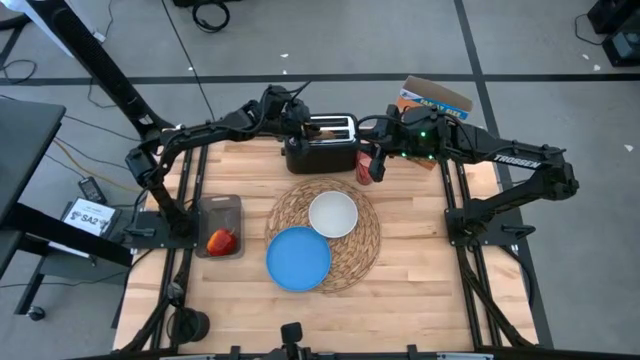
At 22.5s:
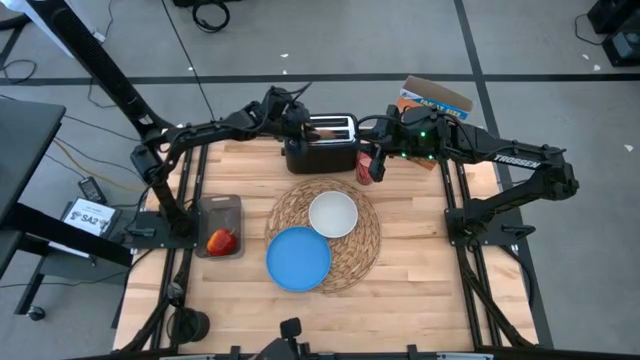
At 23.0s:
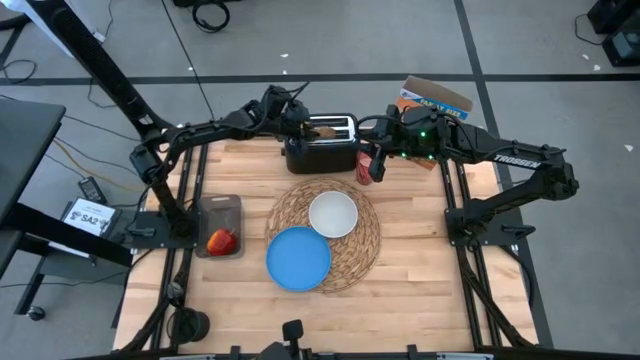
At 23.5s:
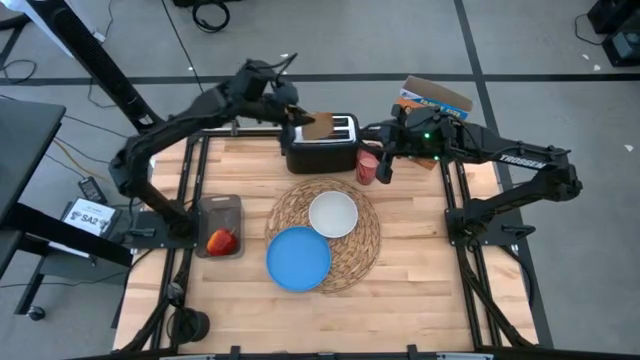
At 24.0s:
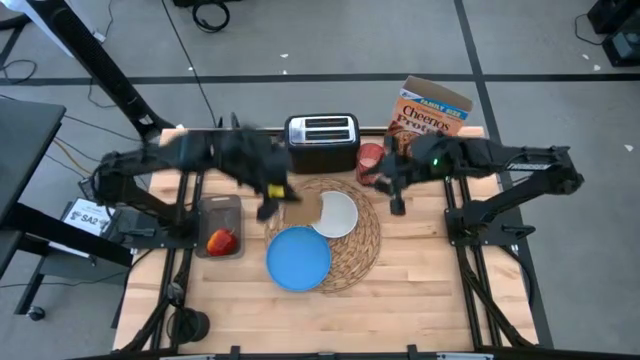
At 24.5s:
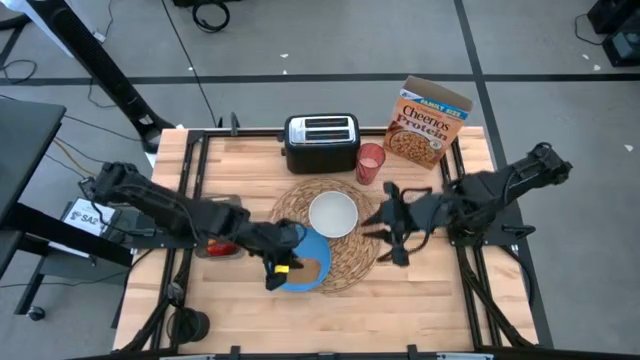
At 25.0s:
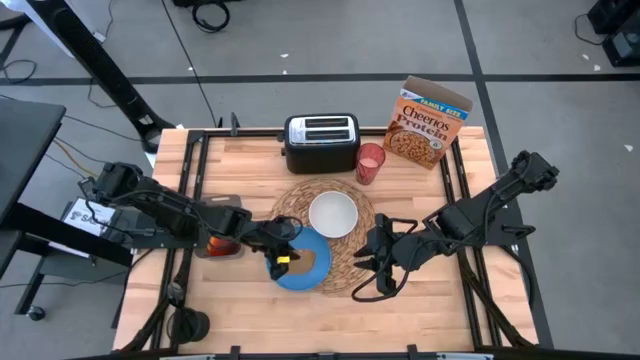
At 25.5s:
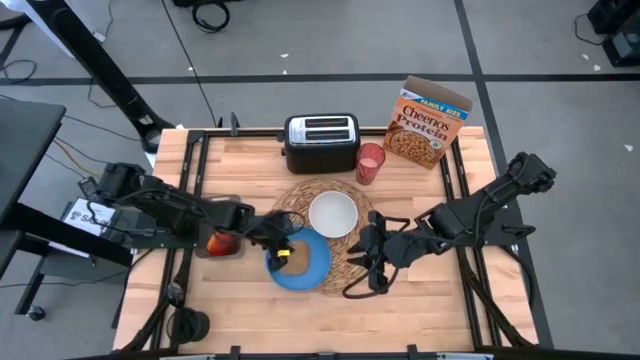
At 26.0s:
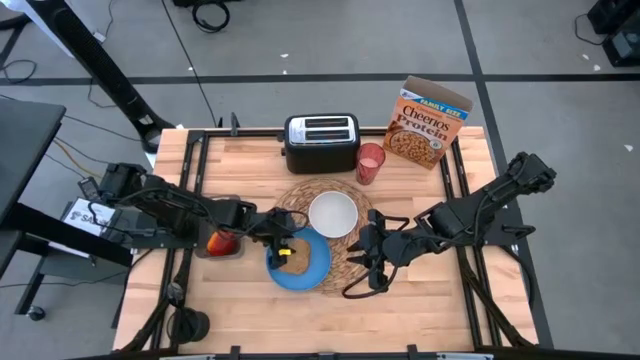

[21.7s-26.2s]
Task: Arrange a breakfast setting
Put the brown toasted bread on the blue plate

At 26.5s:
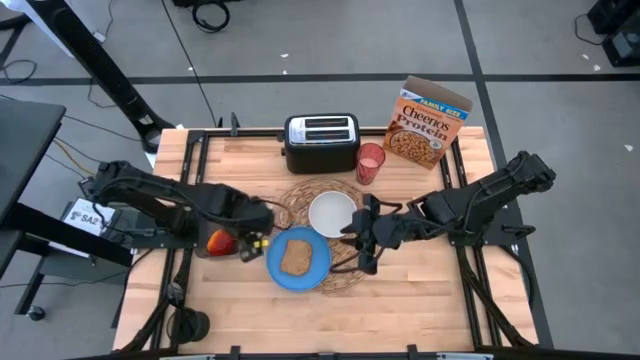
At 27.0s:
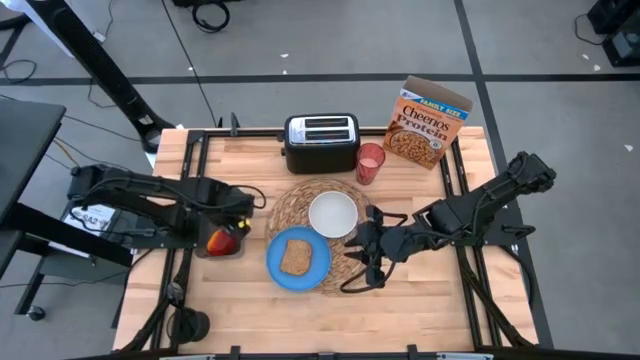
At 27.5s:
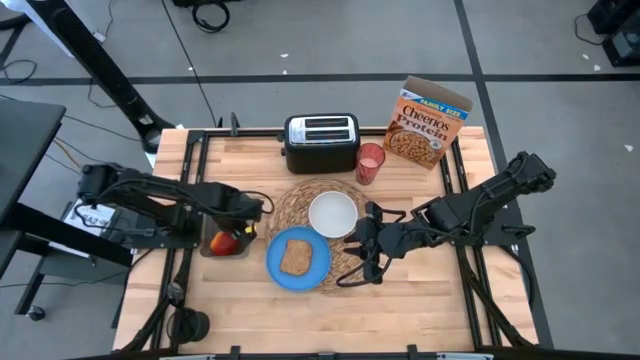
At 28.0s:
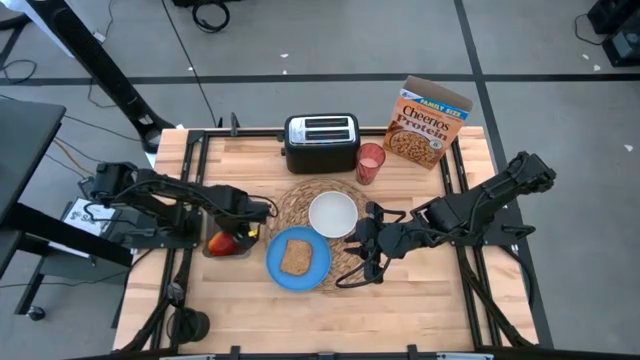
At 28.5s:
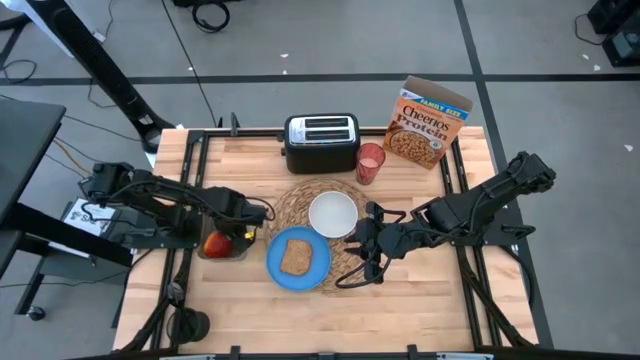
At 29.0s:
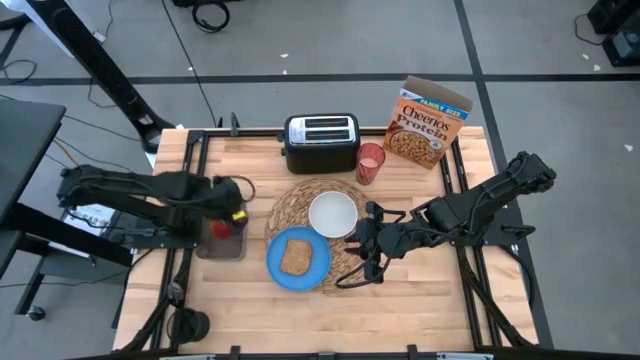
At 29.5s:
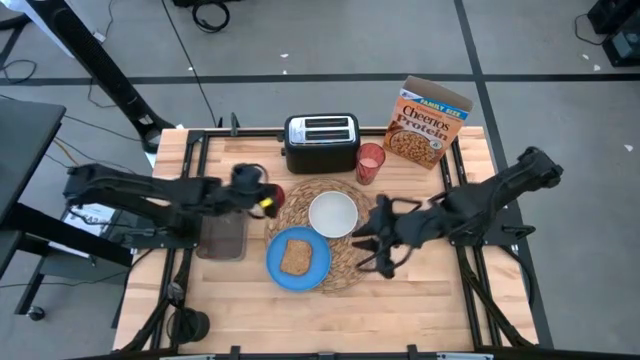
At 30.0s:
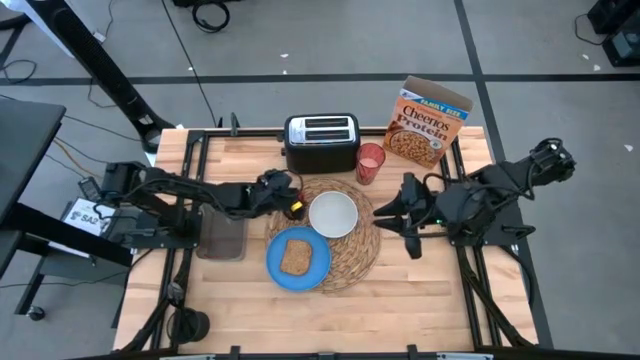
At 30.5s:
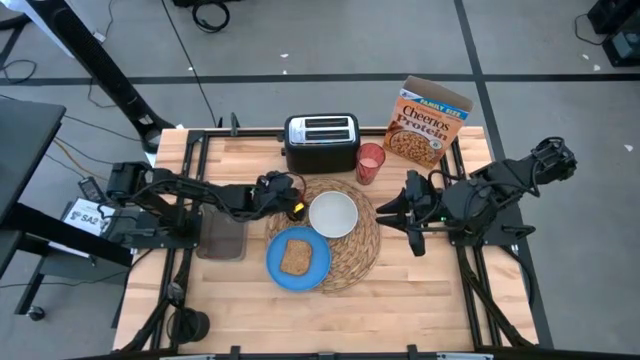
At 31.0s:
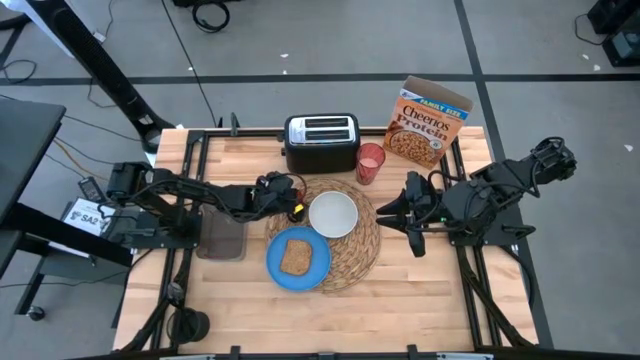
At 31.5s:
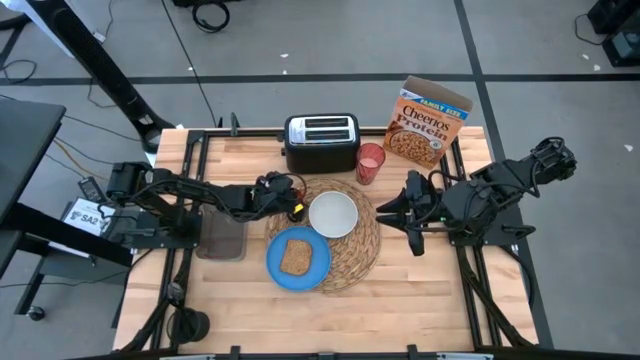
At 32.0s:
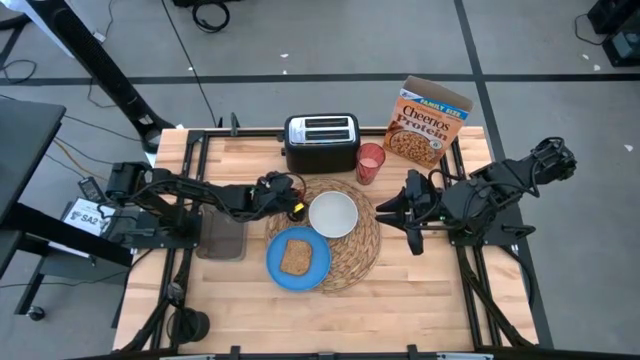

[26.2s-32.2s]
Put the red apple to the left of the white bowl on the brown woven mat

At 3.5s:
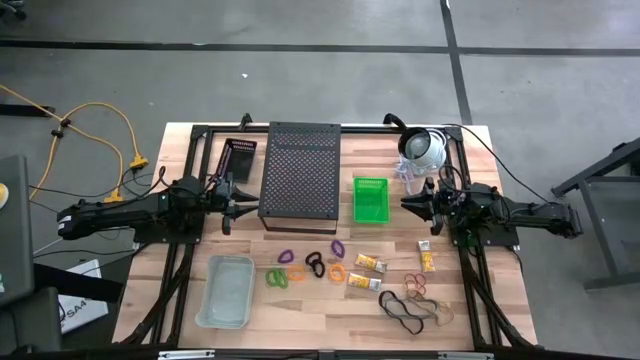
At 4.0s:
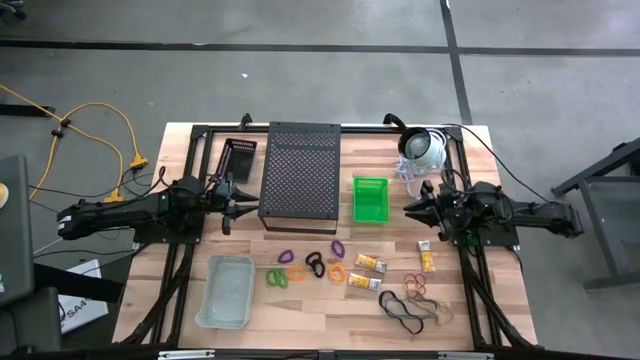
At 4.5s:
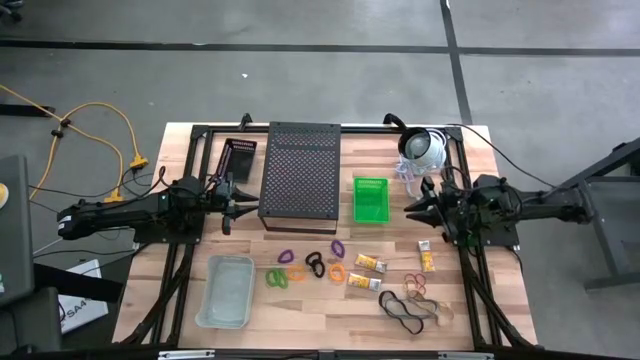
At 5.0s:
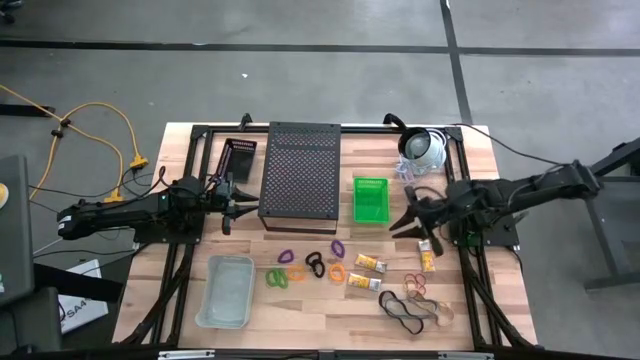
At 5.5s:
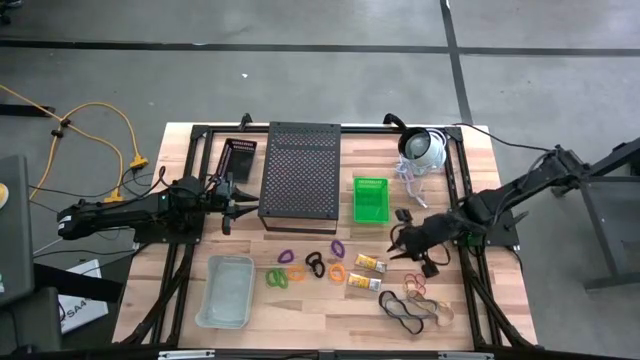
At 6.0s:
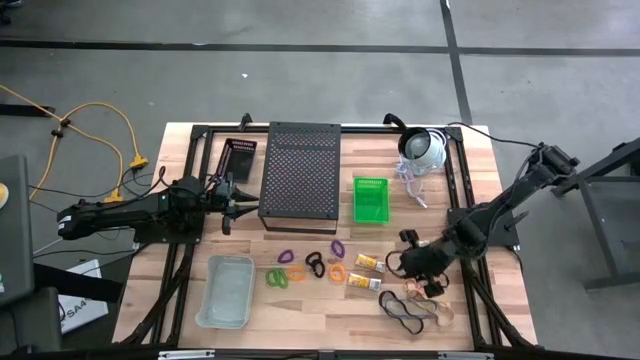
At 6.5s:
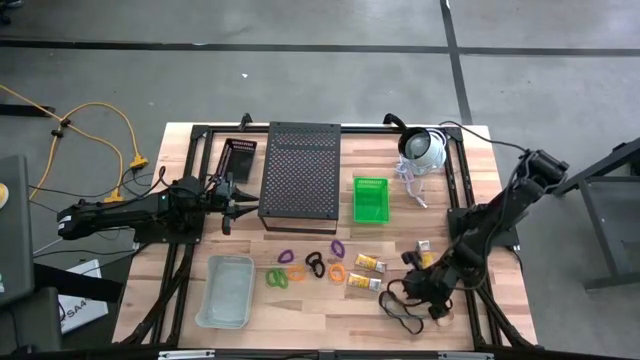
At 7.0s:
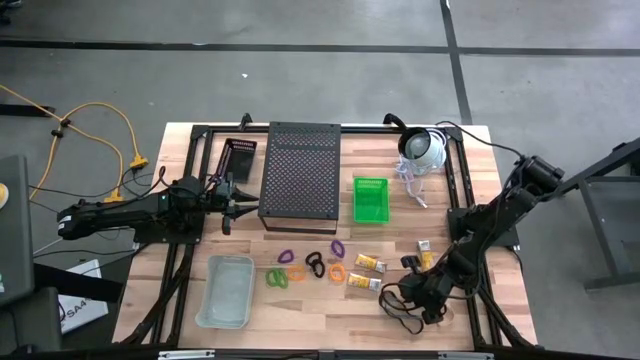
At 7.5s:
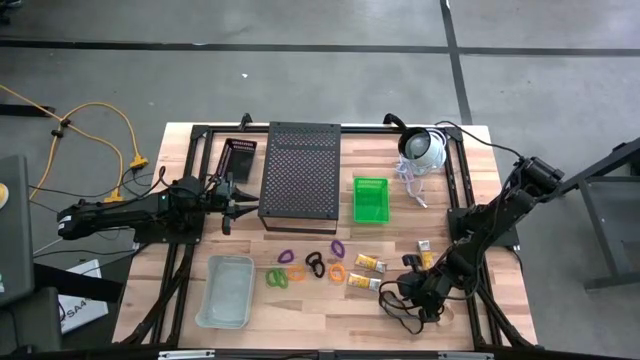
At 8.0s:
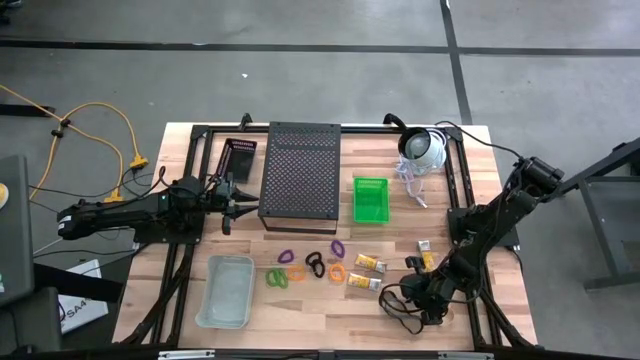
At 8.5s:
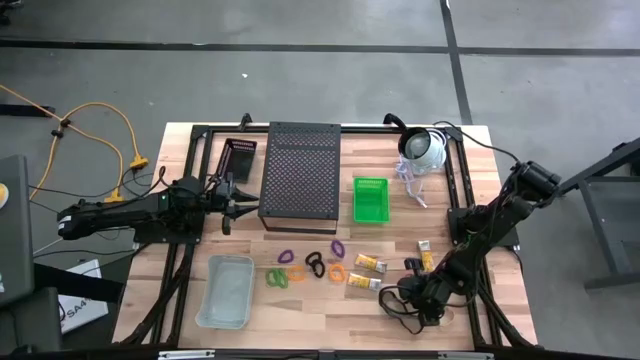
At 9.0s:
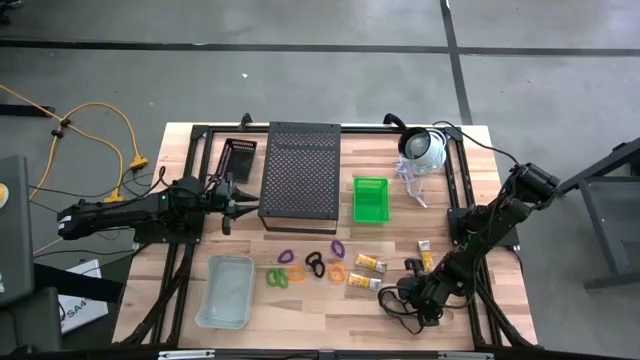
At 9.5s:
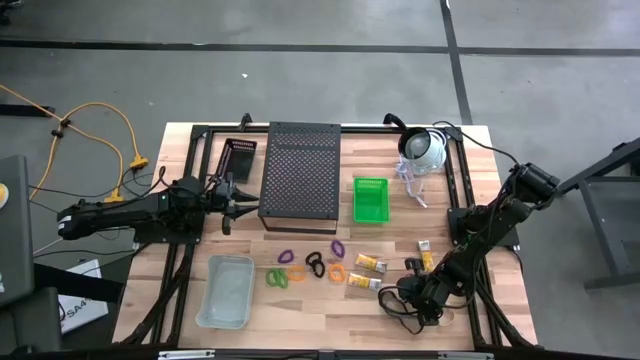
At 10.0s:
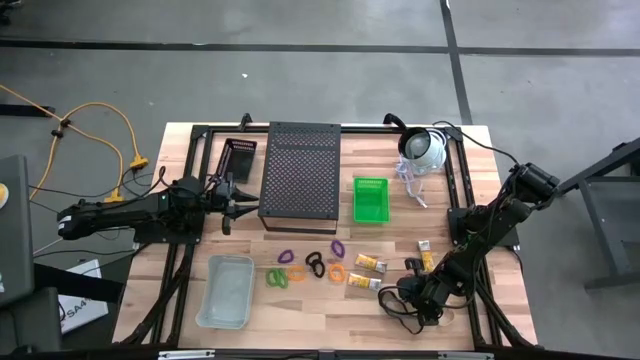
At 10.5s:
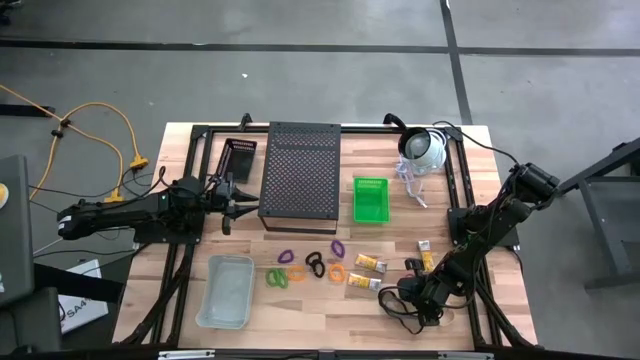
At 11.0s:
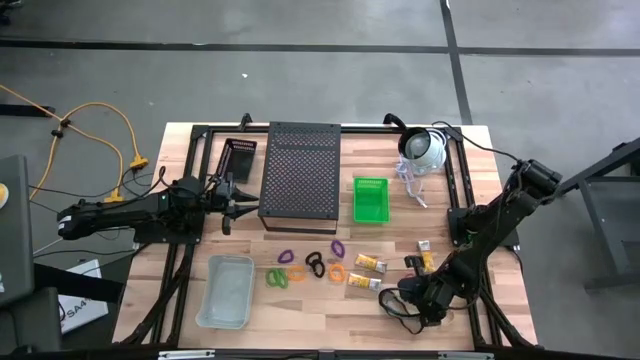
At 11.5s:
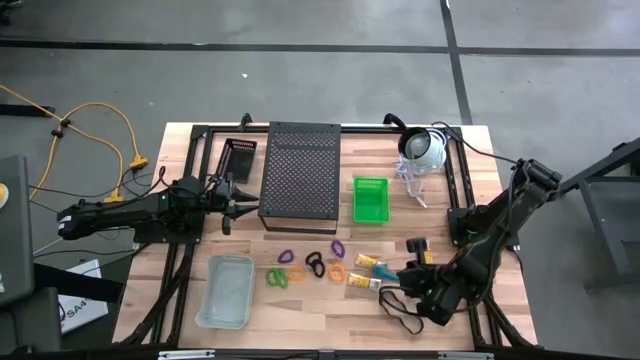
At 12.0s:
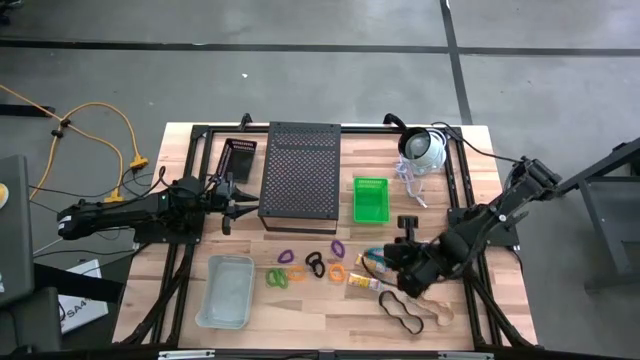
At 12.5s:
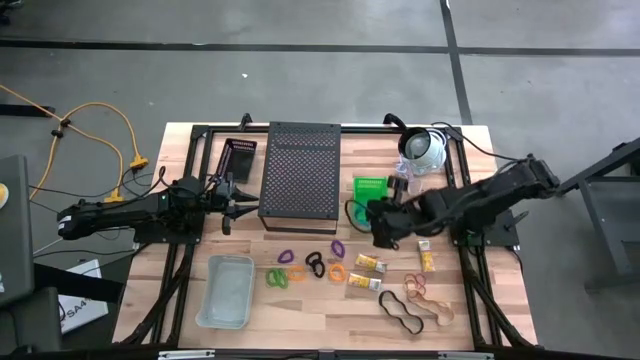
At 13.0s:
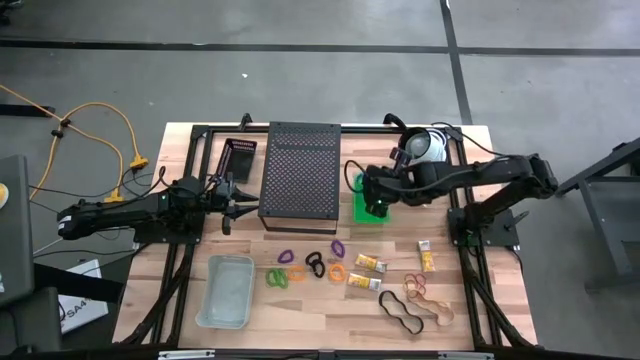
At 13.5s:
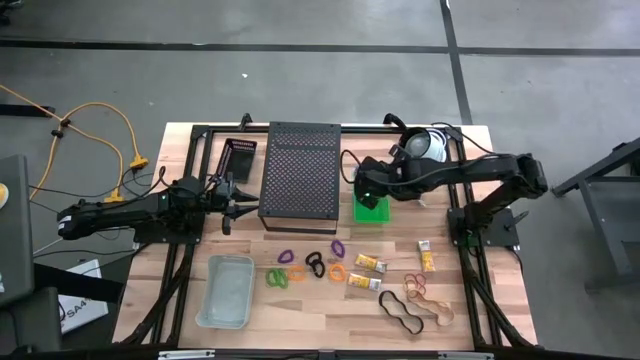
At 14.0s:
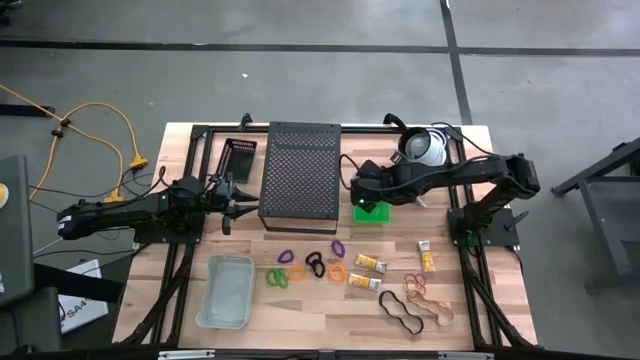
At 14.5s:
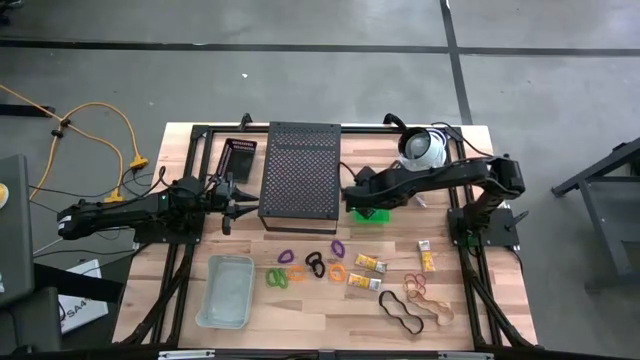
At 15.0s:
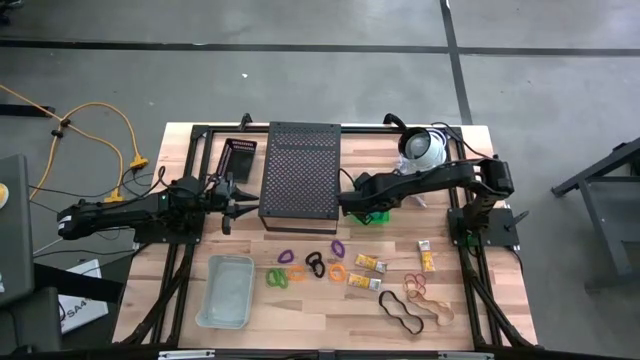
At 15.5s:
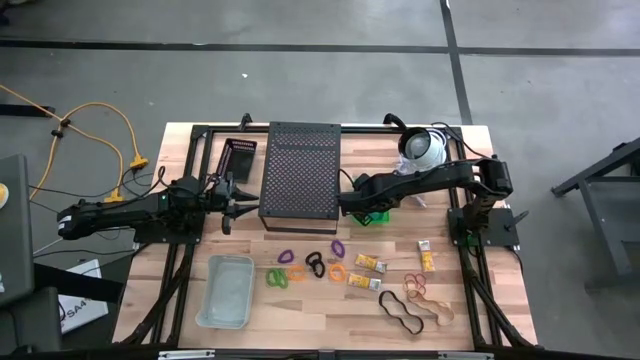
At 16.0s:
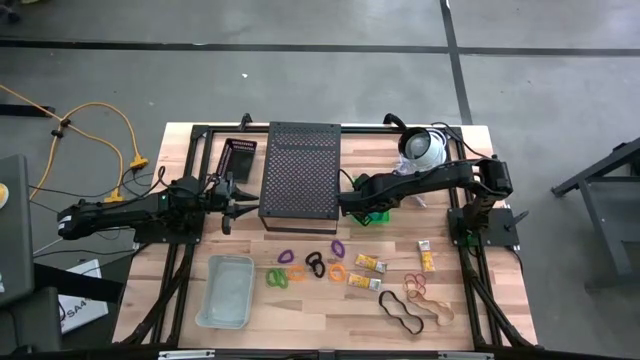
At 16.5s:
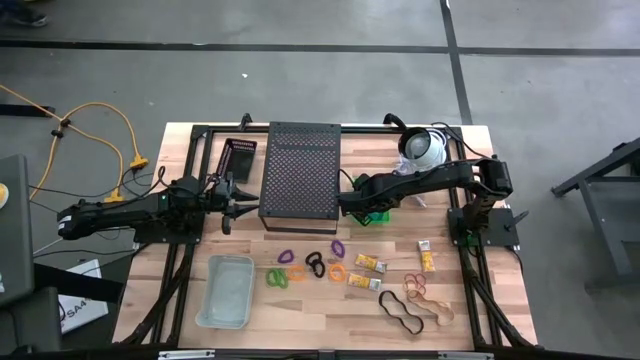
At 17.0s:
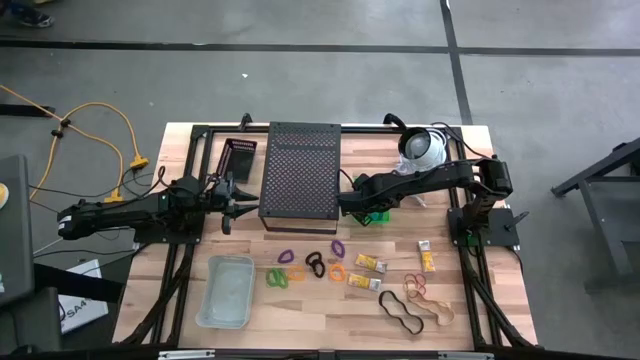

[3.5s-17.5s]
Task: Pick & Place Office Desk Supplies
Put the blue rubber band into the green basket
